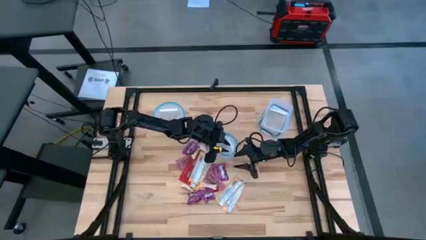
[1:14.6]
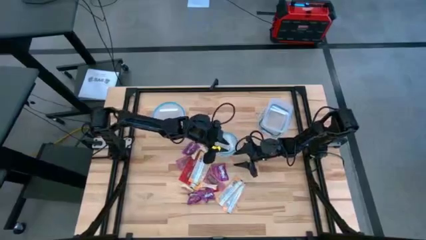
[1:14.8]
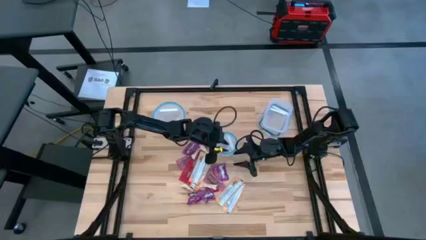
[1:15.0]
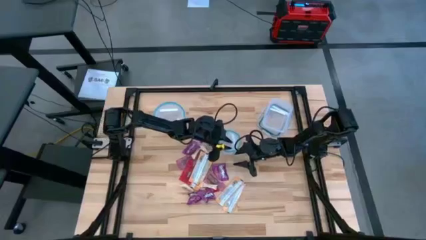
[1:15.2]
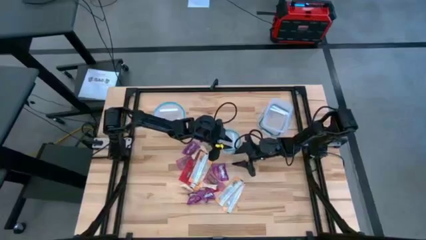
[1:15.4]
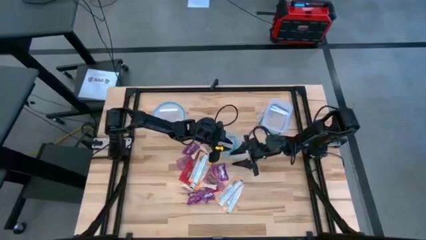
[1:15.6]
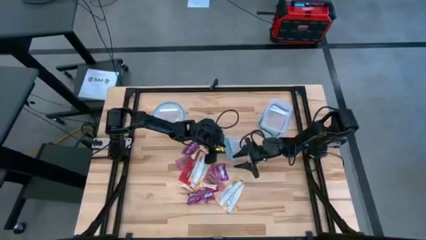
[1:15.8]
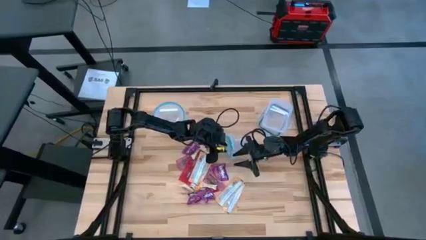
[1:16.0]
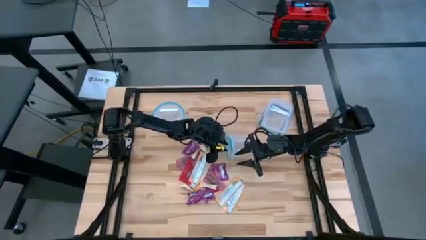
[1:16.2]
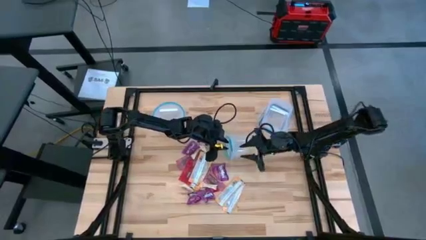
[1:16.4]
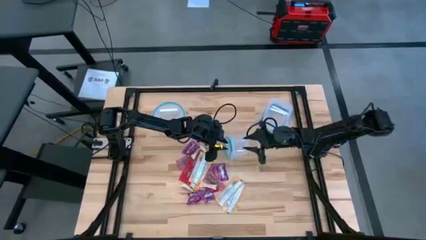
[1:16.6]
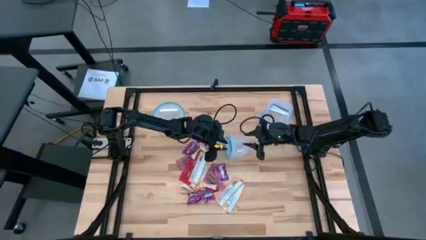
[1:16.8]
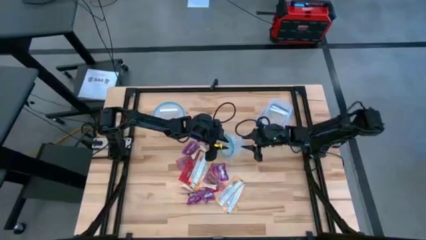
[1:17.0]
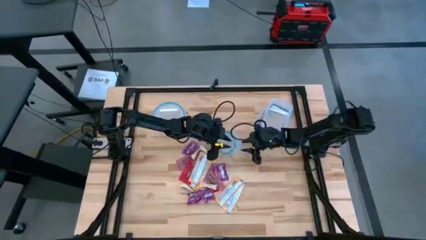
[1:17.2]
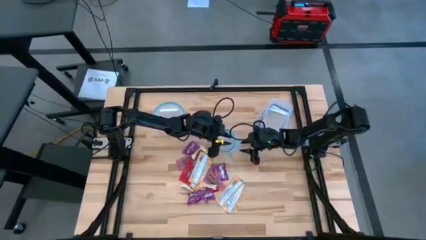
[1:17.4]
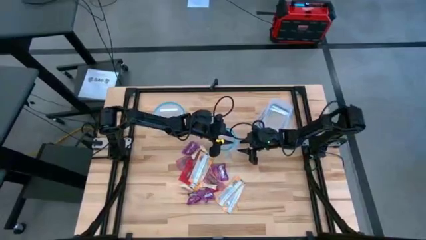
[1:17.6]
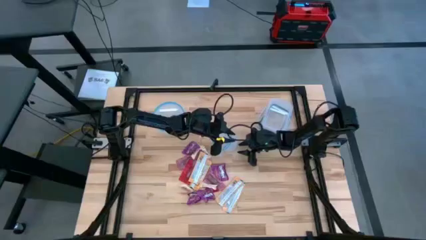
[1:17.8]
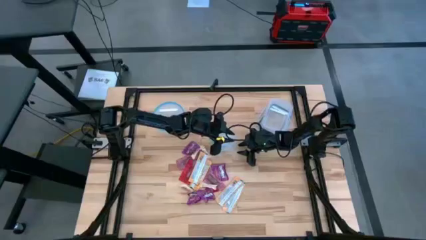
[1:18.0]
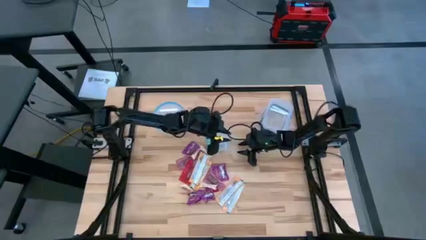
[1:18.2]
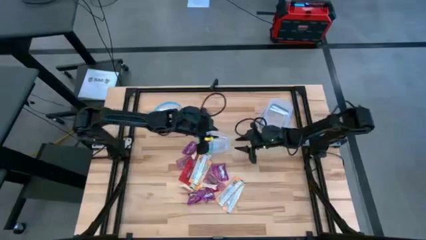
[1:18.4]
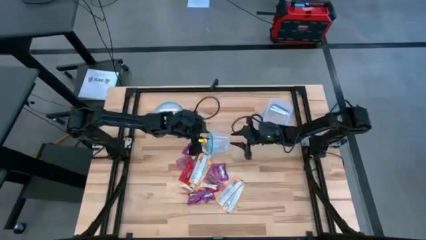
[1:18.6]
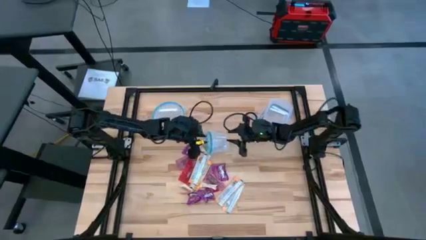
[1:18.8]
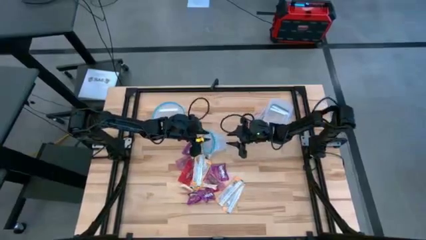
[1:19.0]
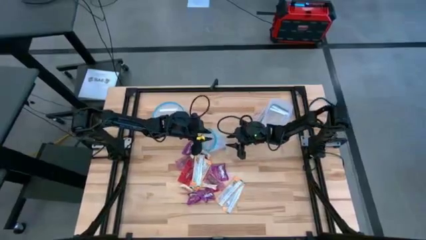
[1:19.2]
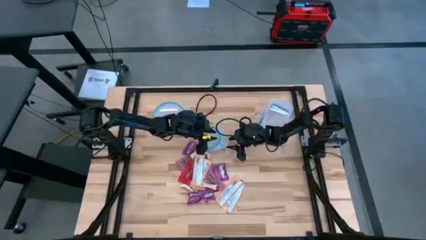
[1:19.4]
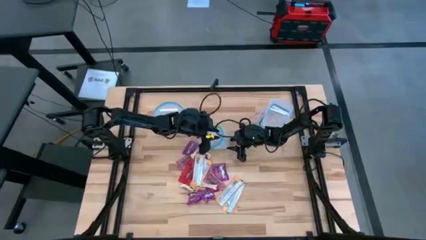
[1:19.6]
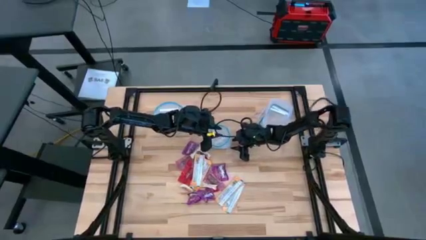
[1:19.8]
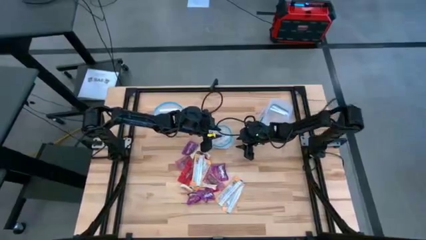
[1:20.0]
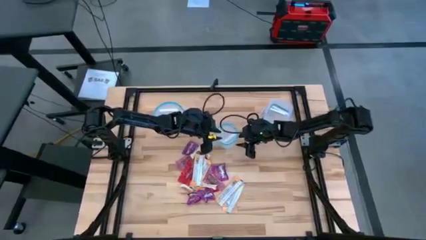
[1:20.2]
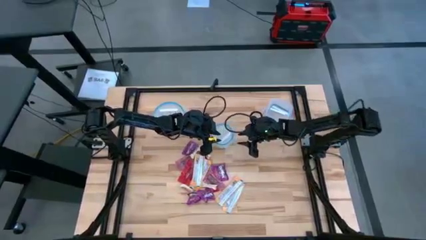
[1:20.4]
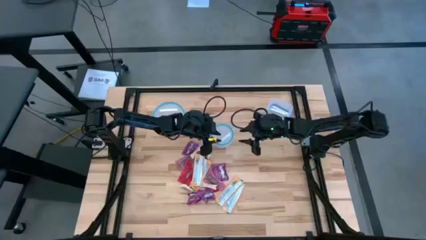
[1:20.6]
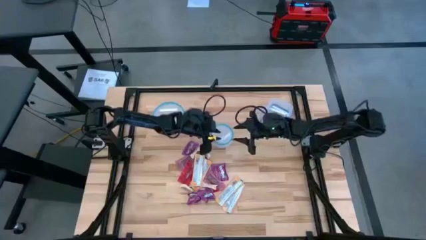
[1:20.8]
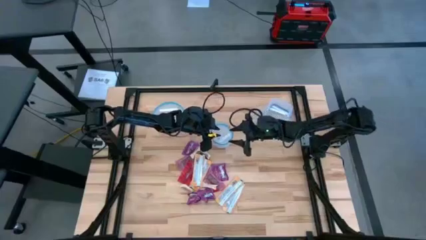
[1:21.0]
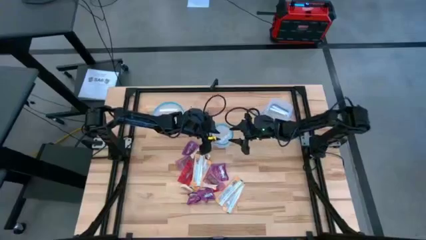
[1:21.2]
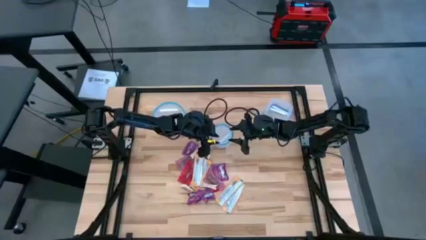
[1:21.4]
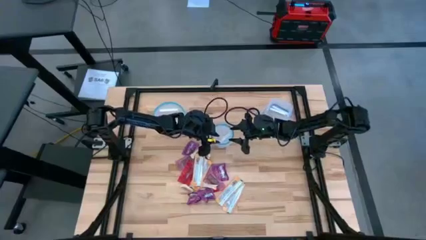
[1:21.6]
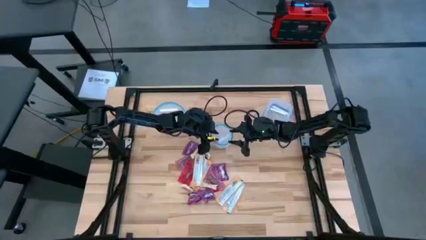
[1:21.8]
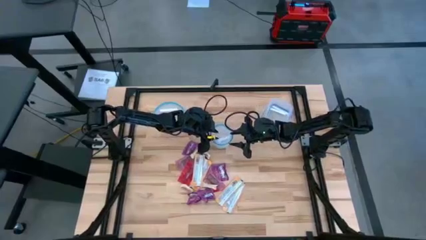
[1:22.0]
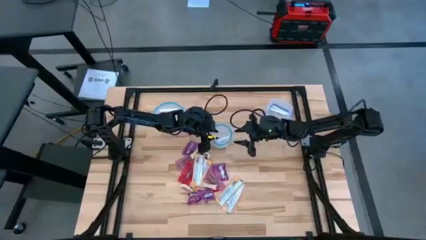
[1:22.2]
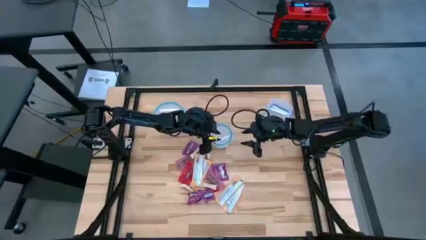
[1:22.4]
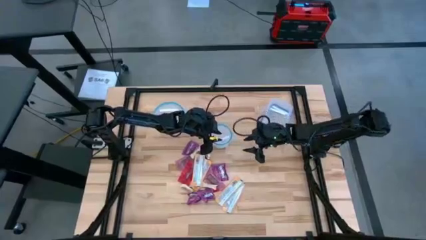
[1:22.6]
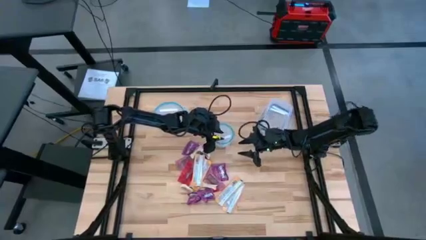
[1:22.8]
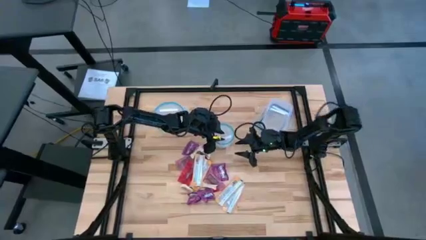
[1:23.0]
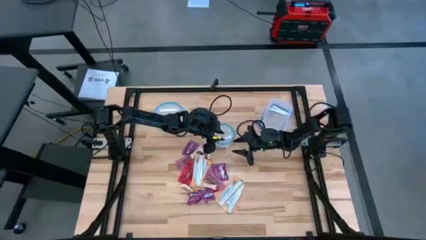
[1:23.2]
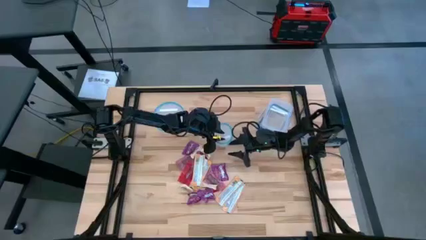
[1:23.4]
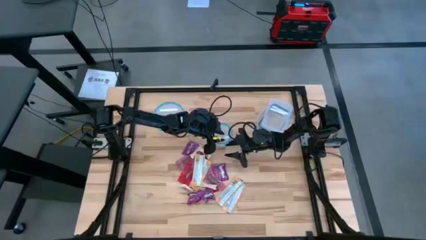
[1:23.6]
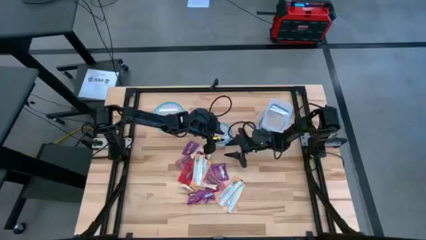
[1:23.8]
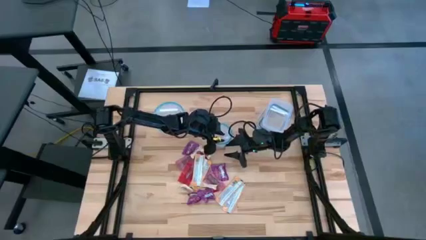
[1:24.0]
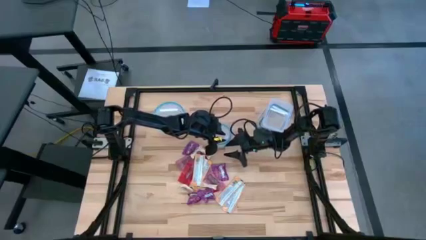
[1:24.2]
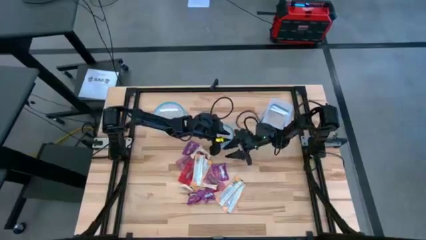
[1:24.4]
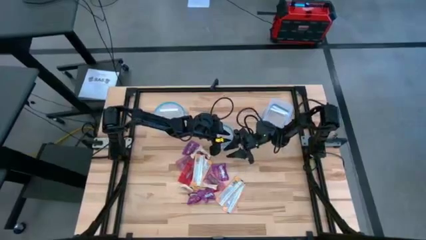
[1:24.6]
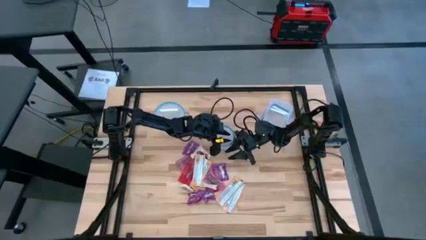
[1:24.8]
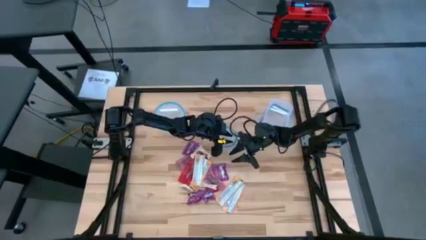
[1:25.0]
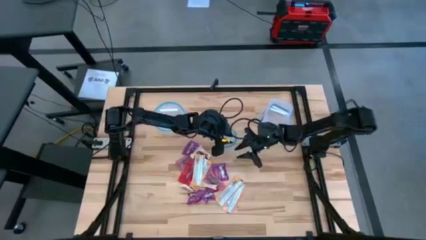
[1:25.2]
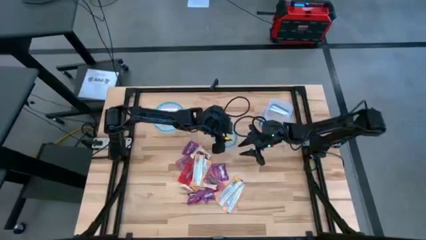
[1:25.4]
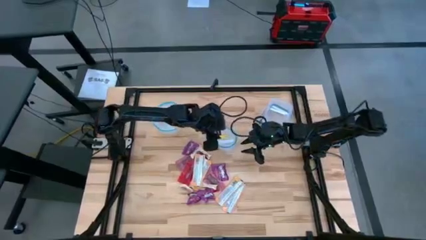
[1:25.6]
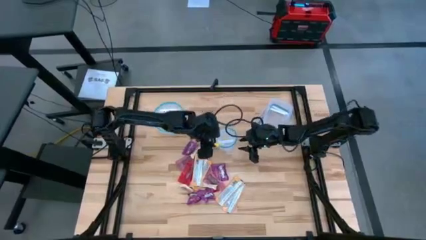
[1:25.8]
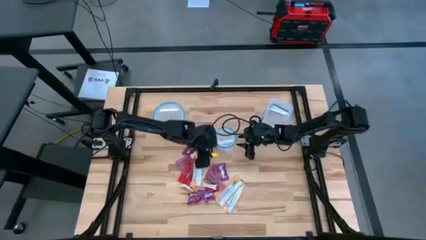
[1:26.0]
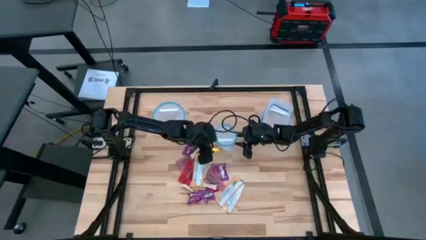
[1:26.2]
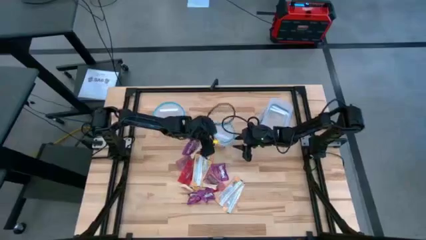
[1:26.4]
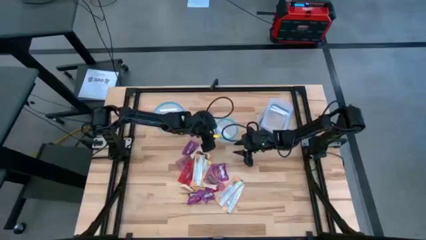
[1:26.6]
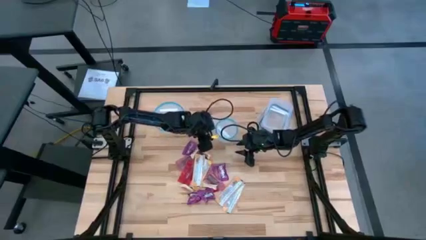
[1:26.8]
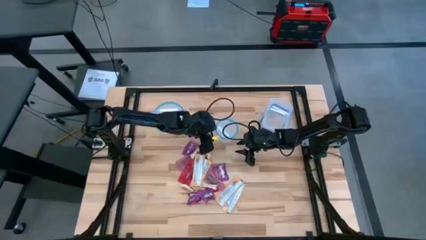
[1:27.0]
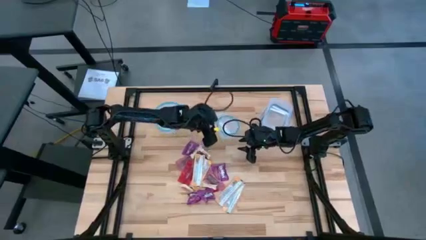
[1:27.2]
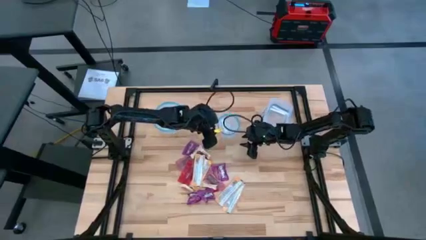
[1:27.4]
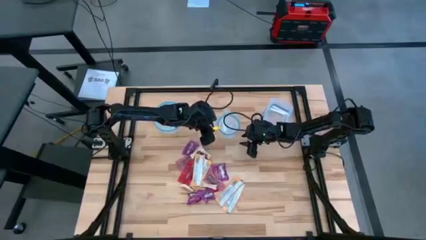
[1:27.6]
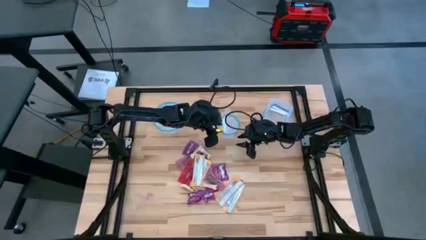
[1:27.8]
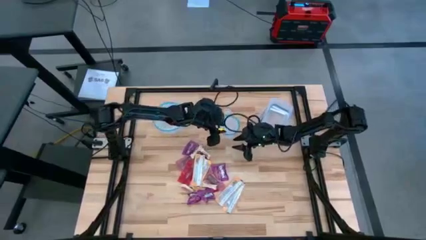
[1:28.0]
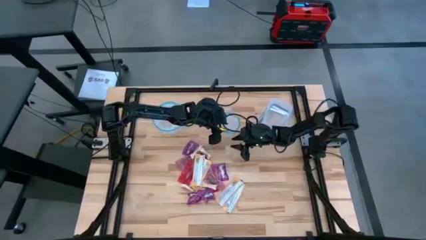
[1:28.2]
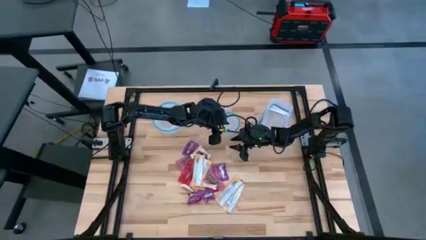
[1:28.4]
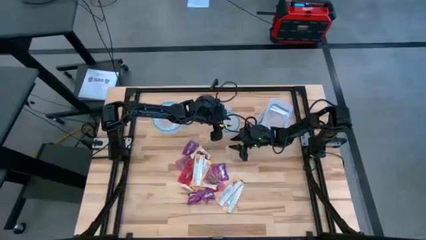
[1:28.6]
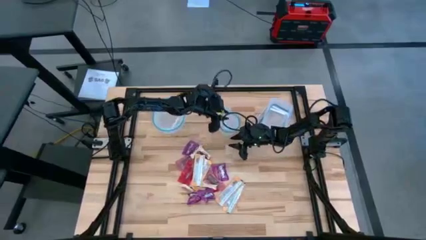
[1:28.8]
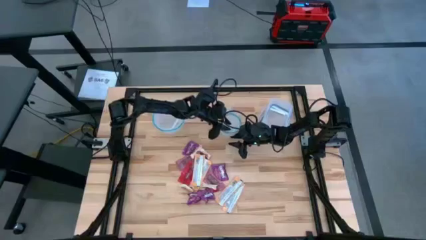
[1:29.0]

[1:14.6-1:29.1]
Task: Sort candy
Open the small round transparent bin
